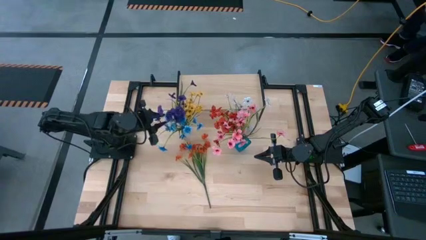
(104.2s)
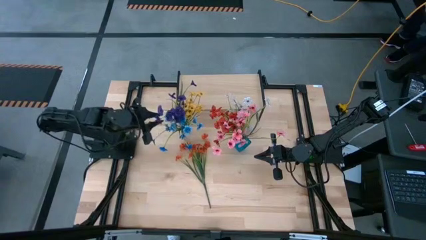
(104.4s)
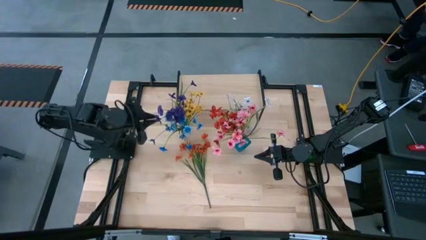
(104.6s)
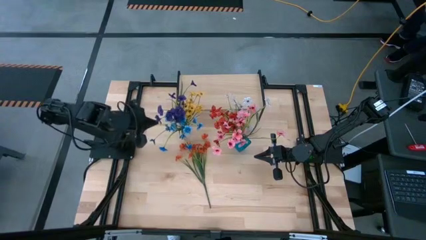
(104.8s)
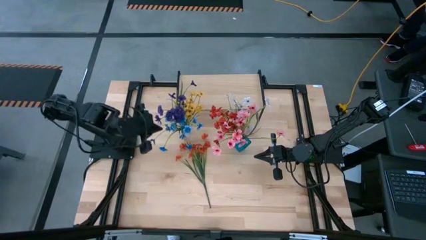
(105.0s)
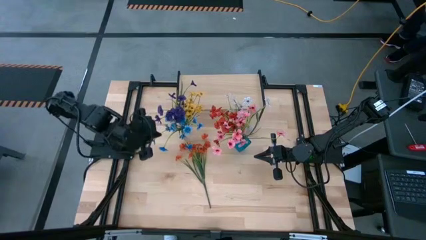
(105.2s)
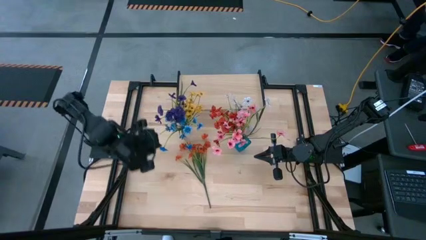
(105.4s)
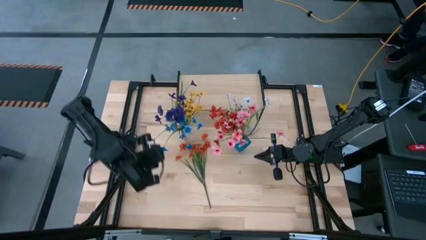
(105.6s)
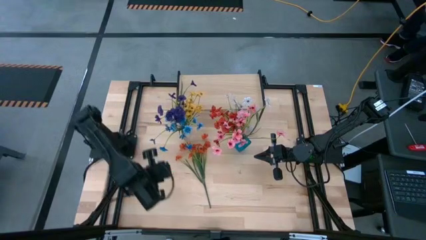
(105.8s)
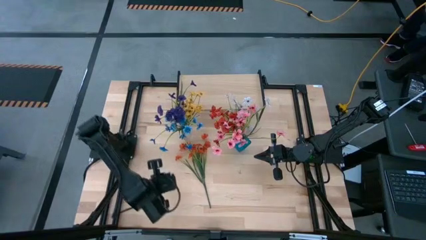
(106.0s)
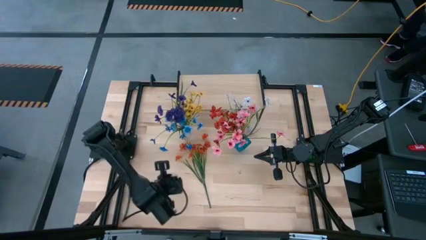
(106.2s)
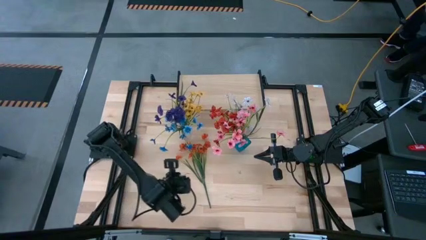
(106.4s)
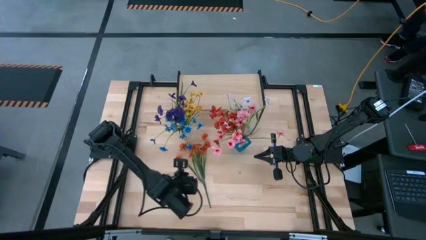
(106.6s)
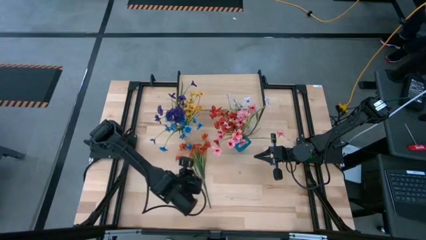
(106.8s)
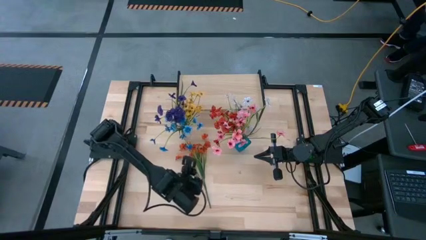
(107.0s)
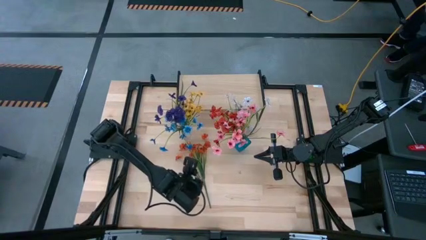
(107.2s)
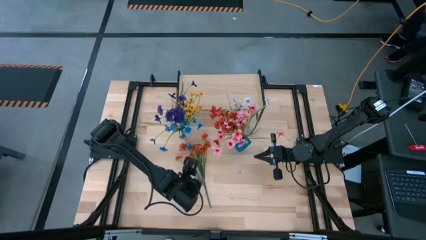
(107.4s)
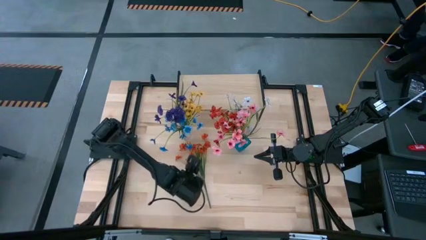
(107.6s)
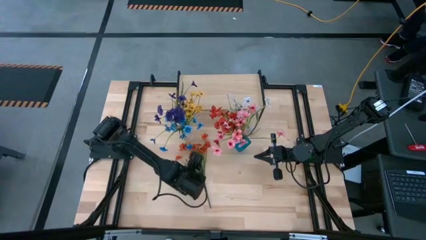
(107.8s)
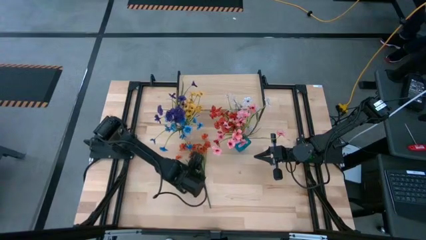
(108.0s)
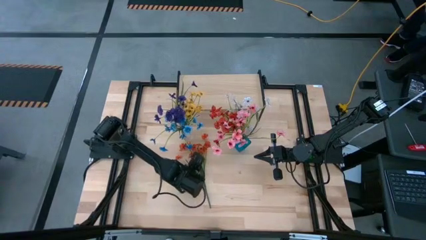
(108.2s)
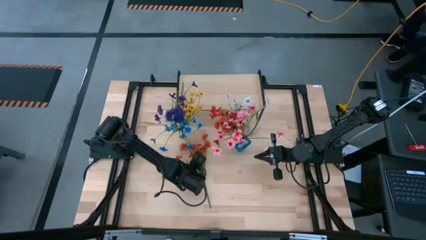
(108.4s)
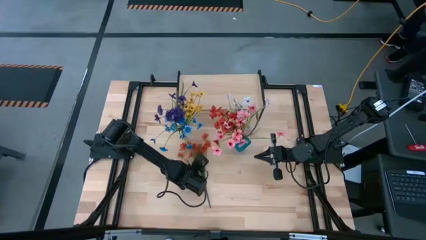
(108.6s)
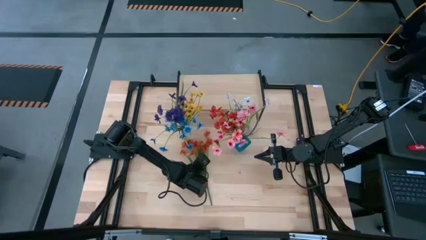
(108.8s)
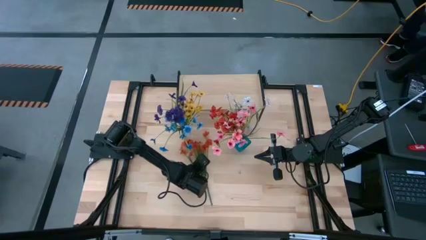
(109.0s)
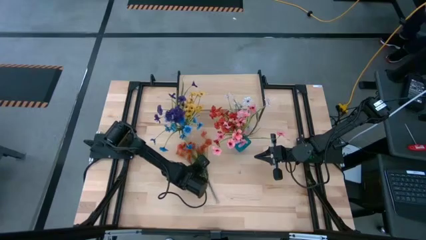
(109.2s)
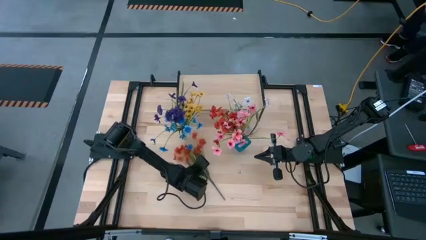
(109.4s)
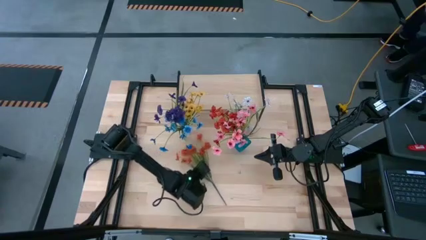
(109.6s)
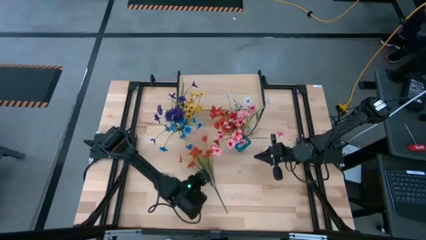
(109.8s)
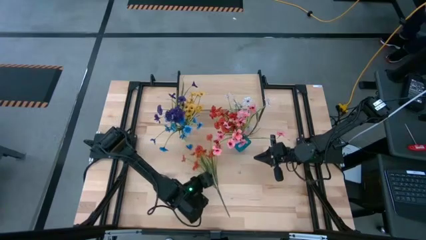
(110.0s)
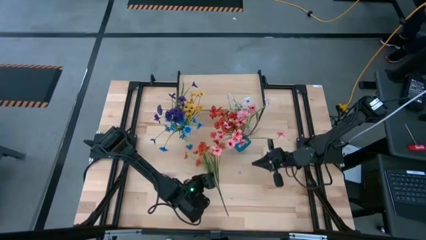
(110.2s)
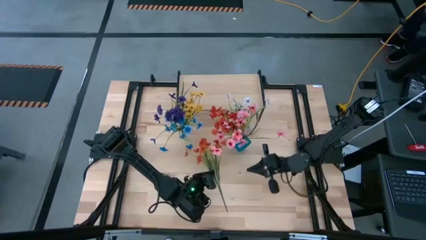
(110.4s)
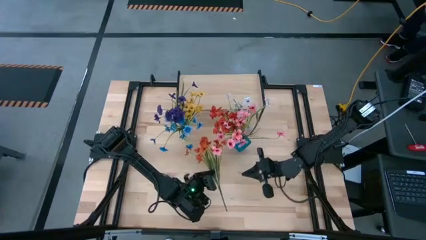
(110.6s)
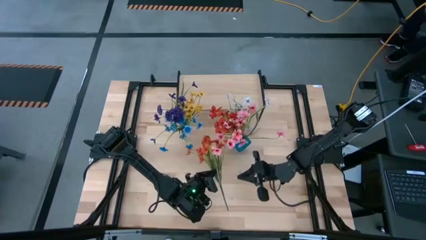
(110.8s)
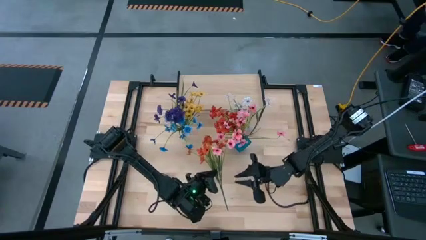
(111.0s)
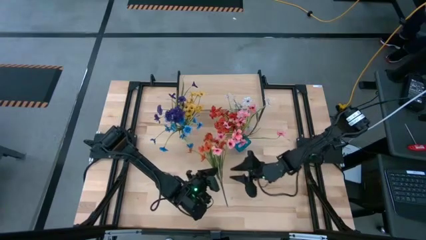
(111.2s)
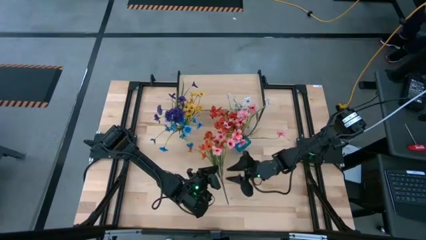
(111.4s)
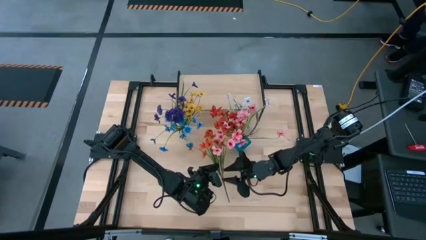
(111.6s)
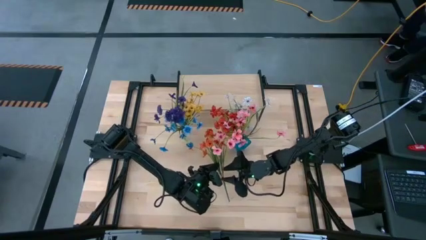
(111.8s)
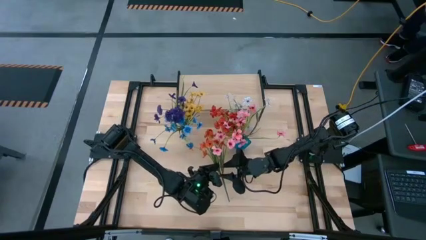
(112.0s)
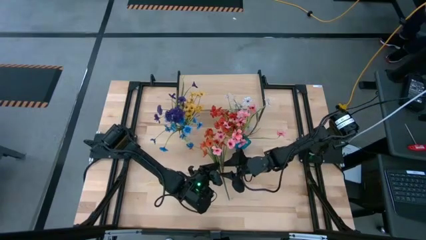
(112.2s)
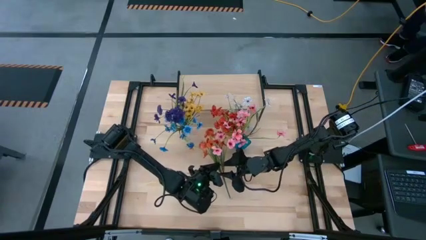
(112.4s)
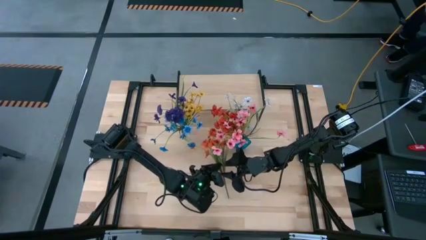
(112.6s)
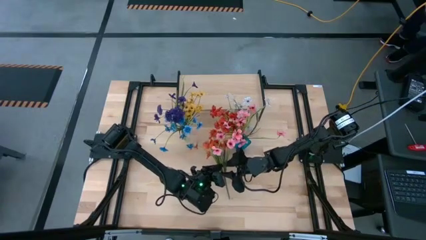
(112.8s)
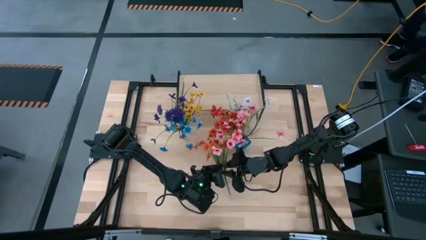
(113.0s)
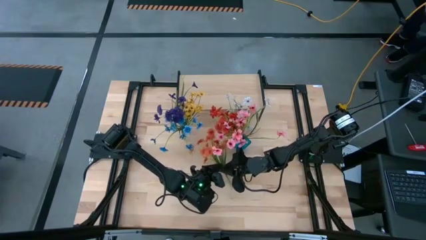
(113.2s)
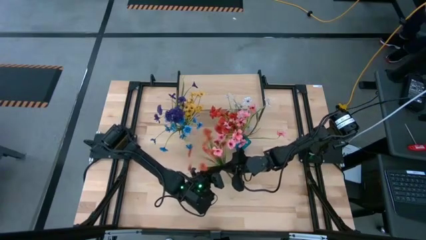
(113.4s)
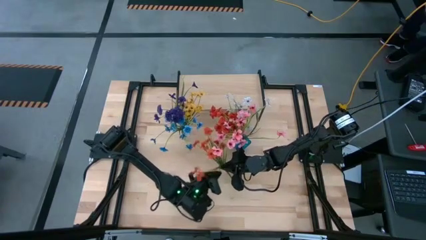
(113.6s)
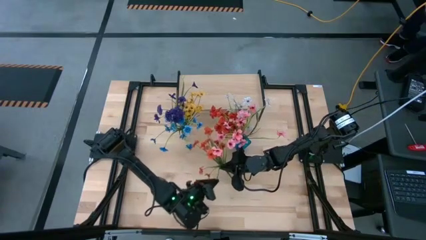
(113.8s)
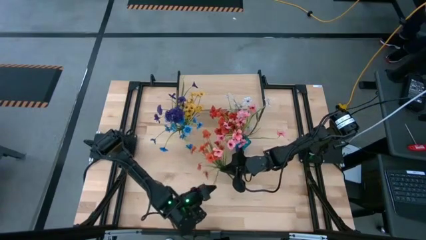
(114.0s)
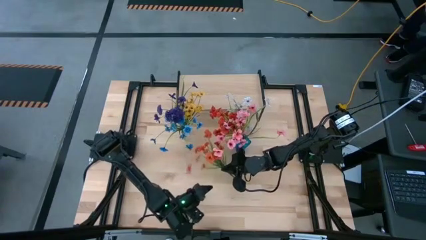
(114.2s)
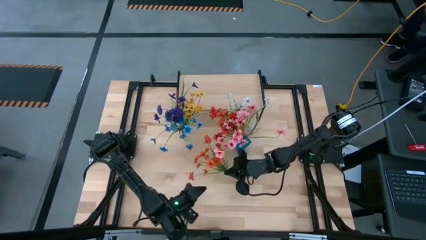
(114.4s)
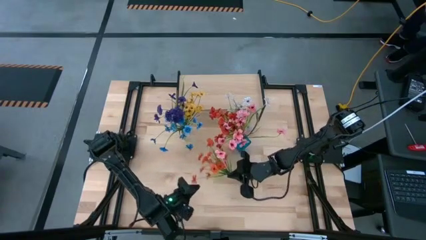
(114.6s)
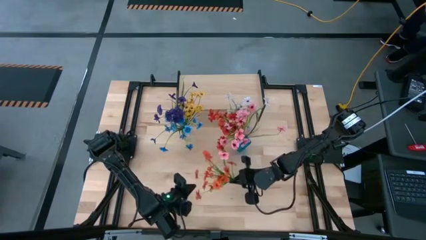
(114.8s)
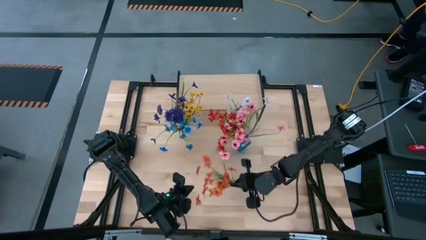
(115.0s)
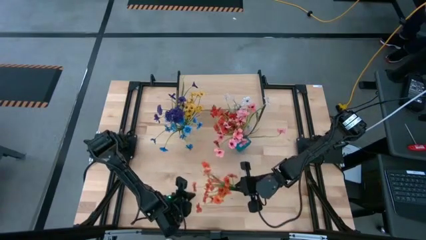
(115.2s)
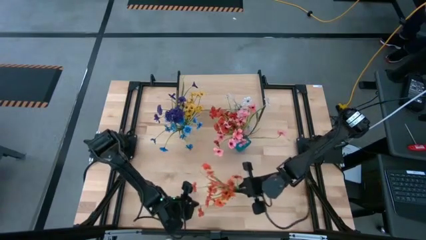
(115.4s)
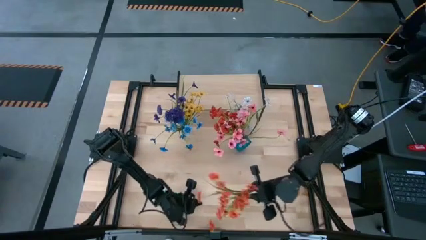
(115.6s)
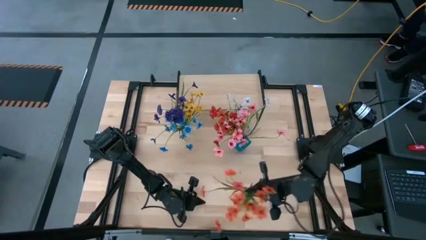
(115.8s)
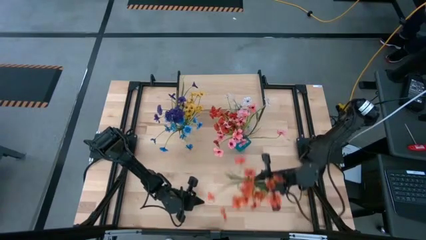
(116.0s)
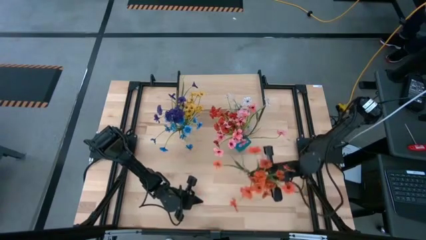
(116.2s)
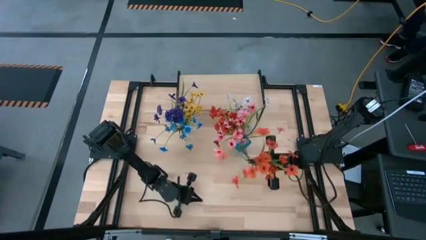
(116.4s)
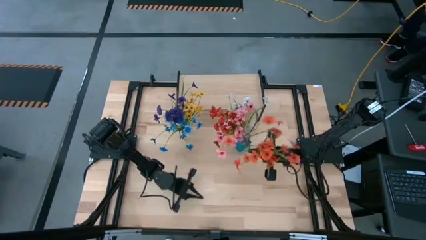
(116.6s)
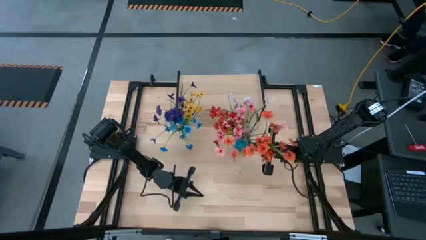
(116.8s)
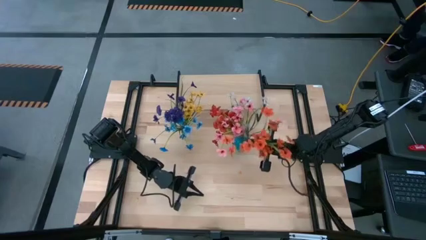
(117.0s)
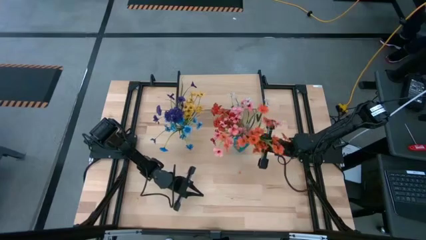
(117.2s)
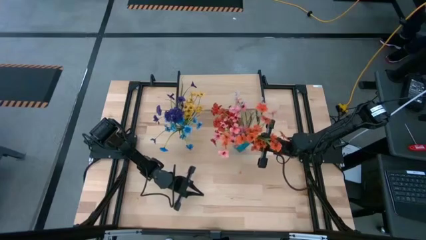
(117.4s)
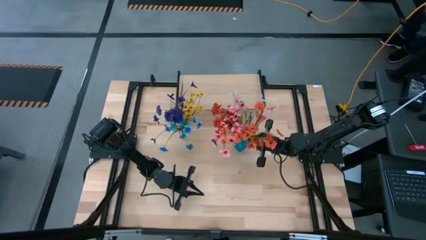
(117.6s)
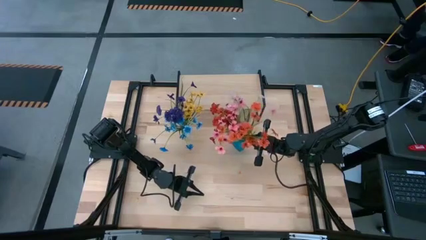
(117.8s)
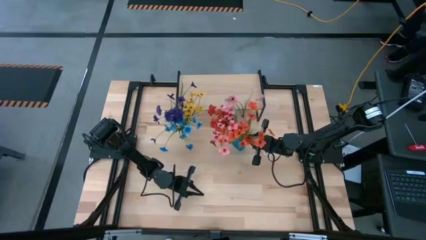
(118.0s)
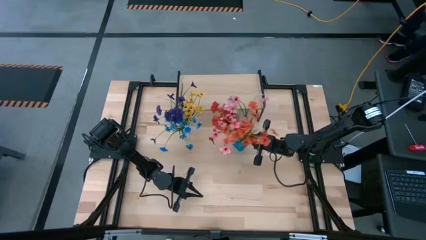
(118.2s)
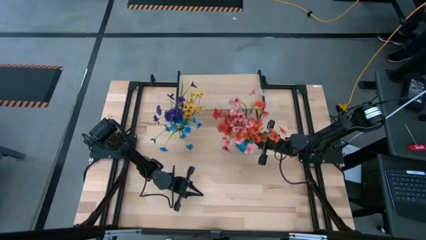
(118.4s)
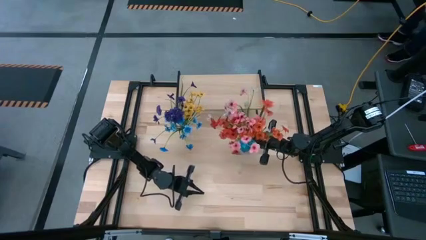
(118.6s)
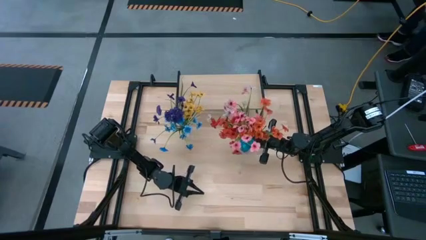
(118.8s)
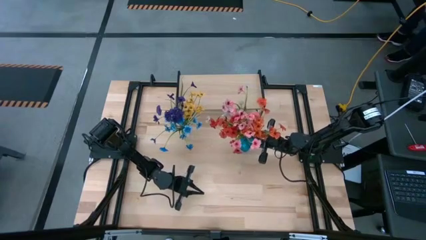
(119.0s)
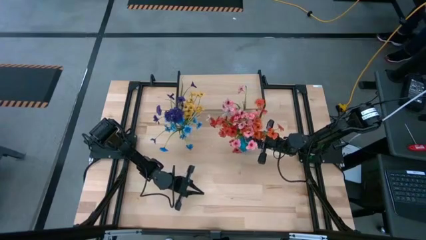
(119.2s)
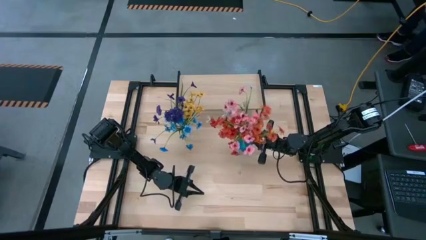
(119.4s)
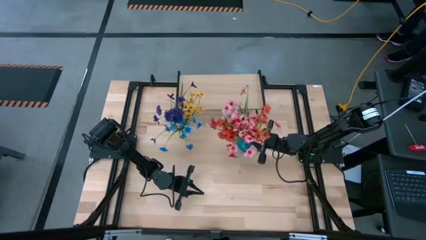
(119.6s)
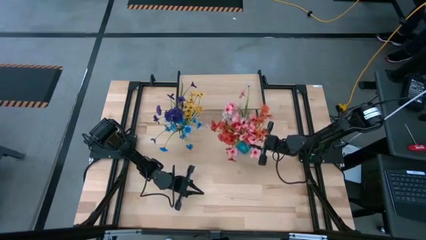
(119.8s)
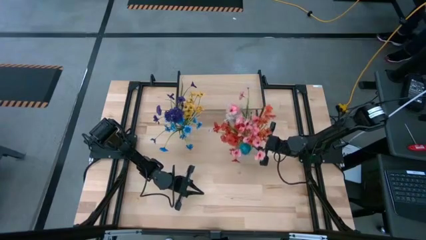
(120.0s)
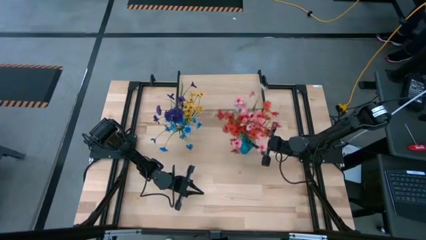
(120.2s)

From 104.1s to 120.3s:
Task: Pick and place flowers into a vace then onto a shelf
Put the orange flowers into the blue vase
